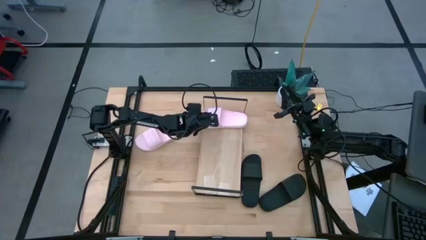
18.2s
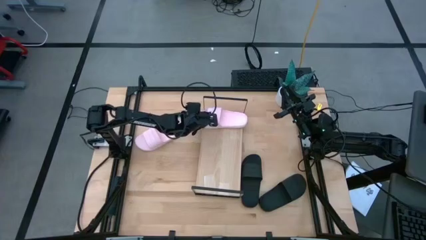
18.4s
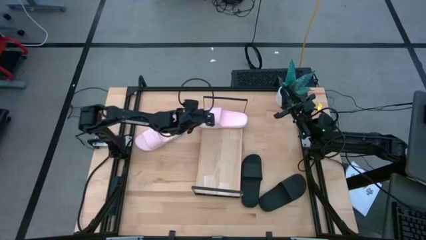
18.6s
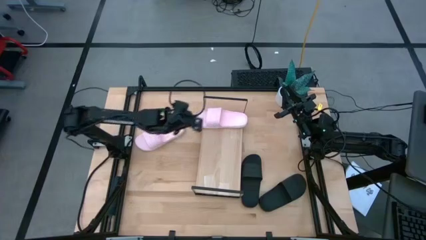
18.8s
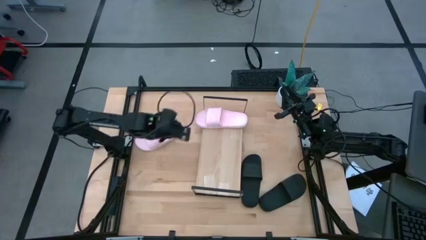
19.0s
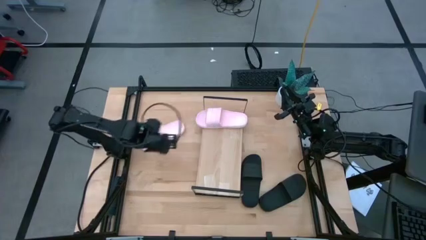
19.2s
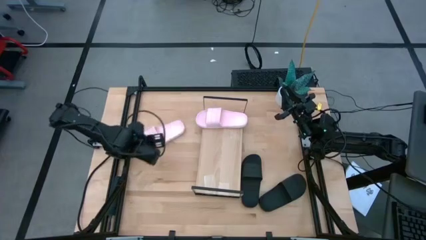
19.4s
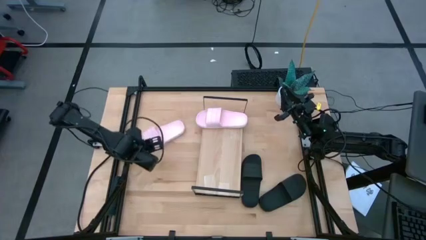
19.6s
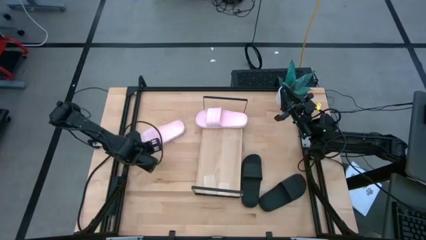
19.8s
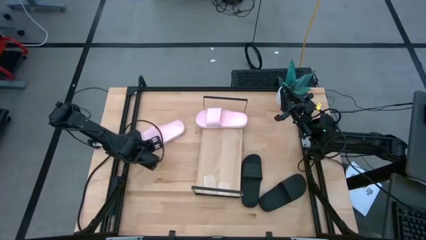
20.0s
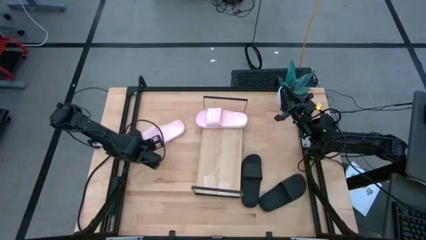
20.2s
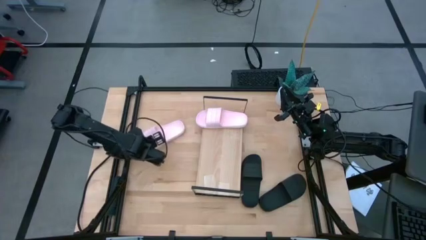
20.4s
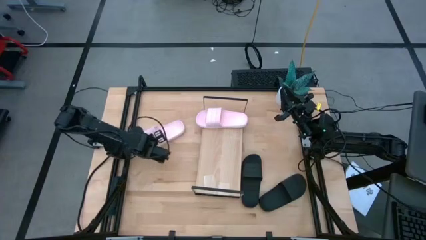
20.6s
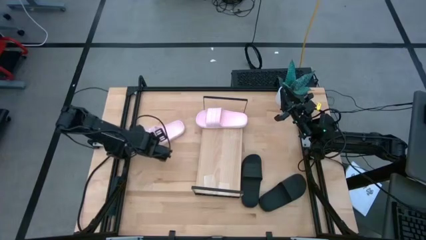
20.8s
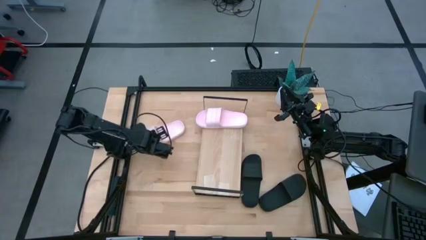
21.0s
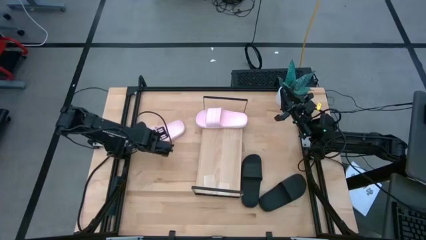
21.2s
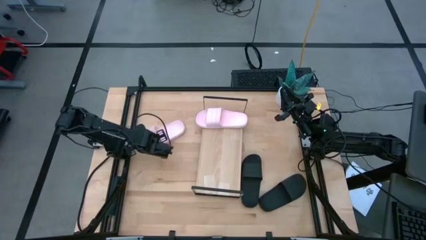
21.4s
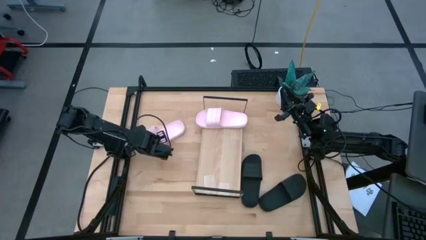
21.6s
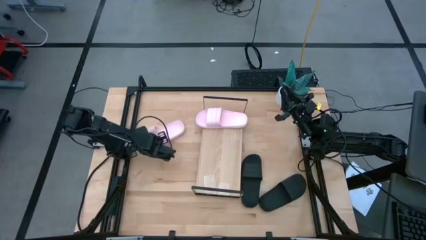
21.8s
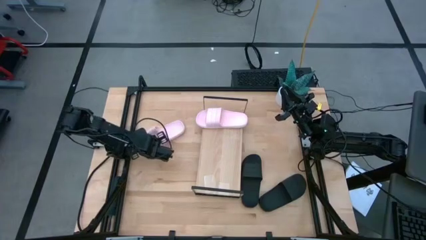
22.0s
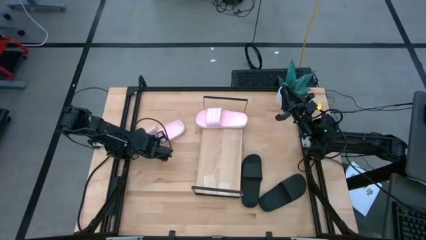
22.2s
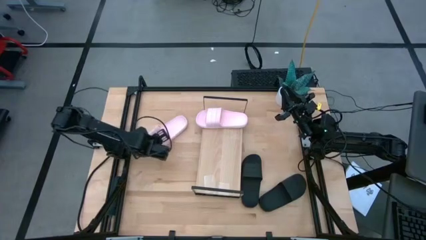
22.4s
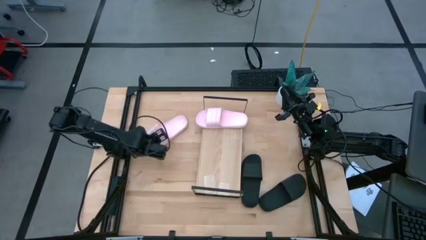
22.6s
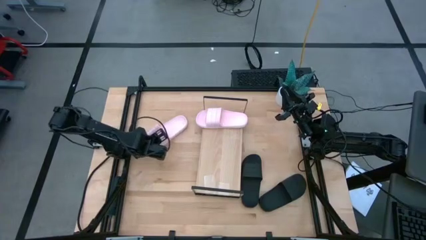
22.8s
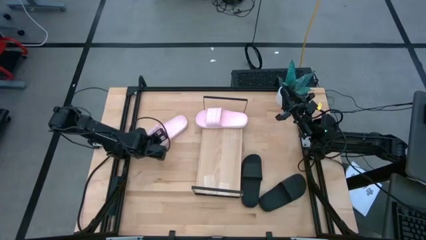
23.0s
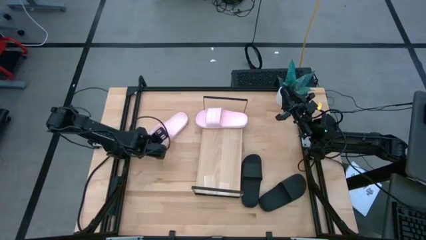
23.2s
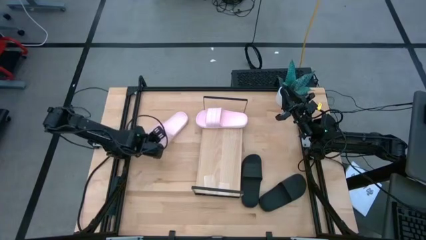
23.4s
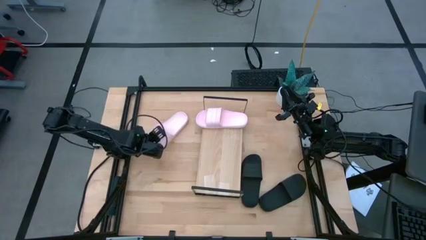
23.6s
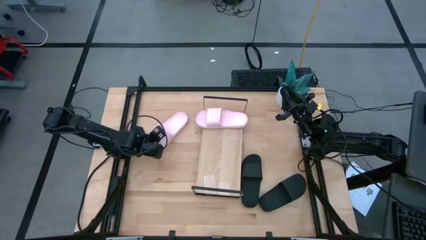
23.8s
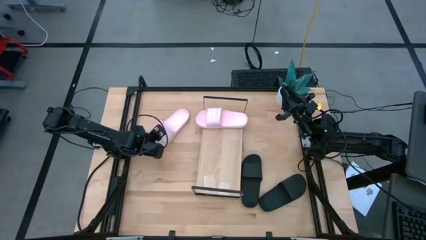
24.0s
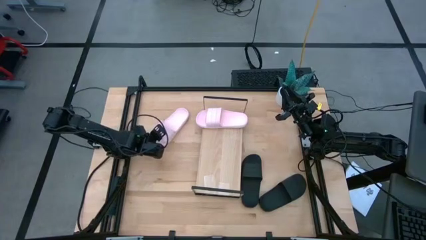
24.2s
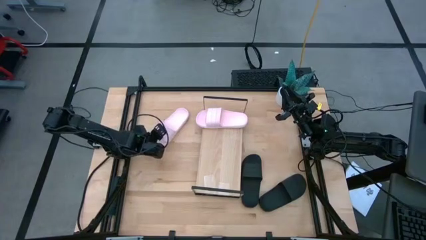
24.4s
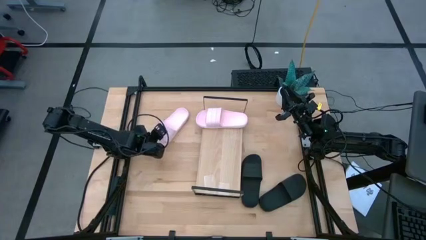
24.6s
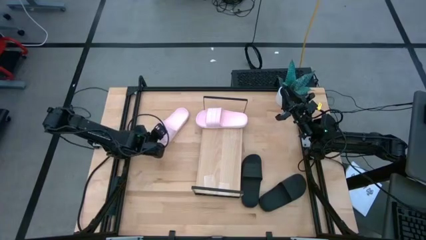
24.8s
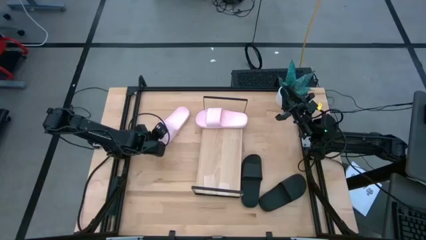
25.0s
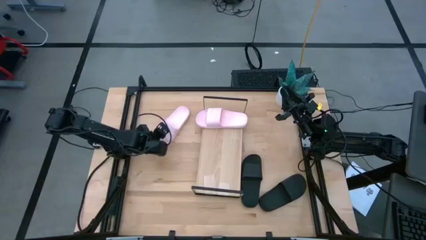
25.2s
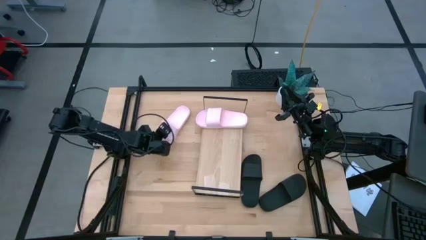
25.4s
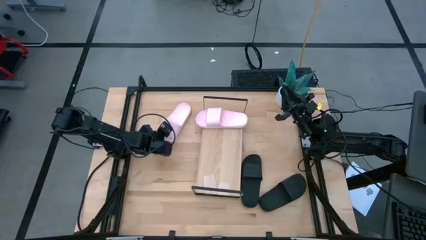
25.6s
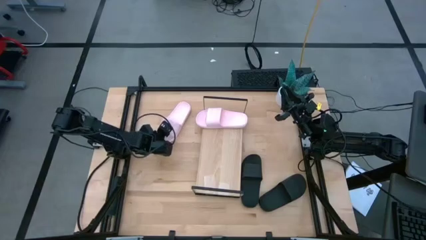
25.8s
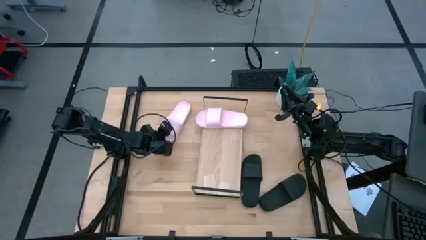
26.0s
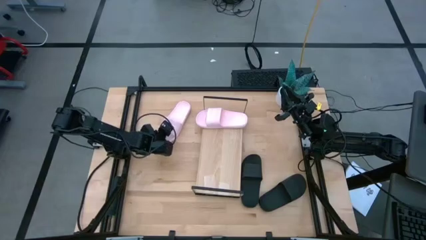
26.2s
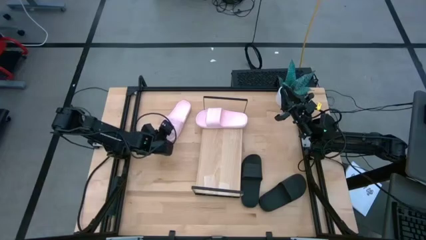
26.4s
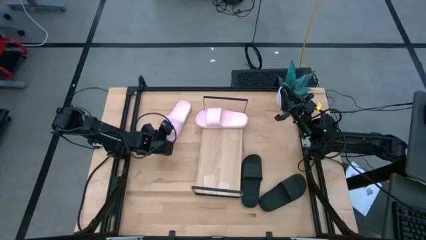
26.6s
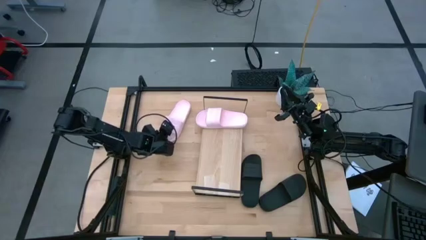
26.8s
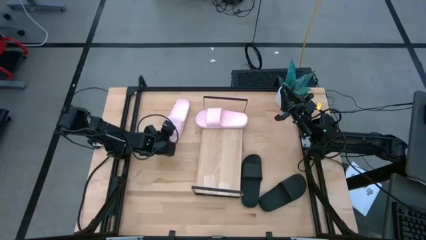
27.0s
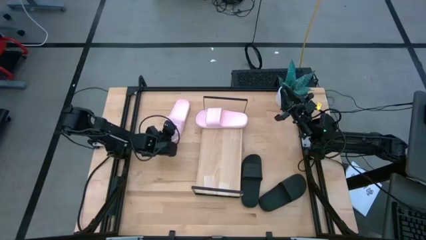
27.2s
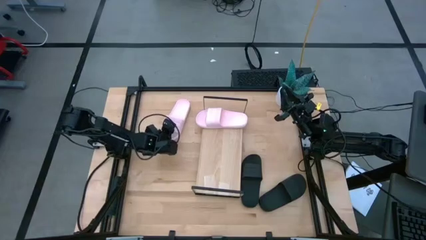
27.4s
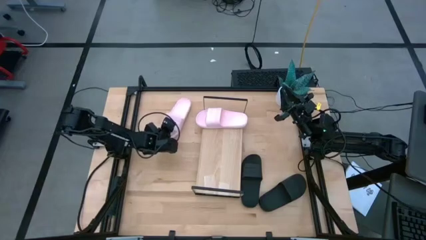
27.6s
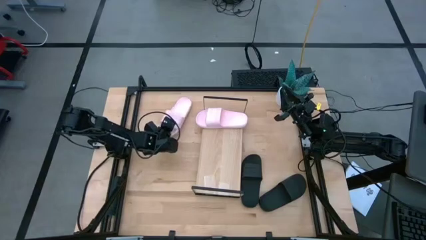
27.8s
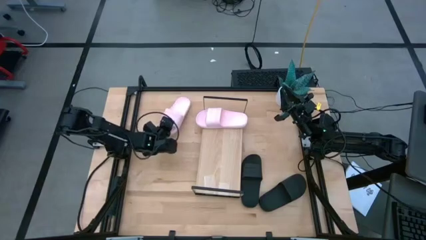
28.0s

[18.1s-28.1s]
Task: Pick and place slides into the shelf
Put the pink slide on the shelf
